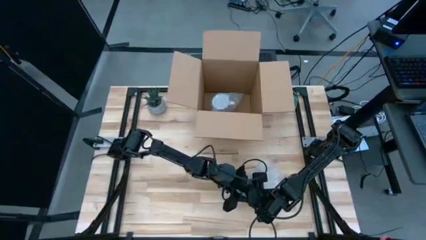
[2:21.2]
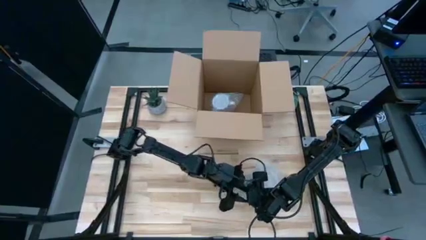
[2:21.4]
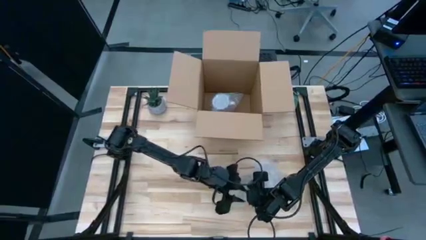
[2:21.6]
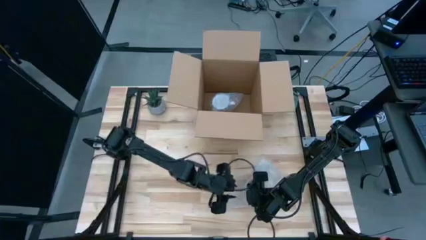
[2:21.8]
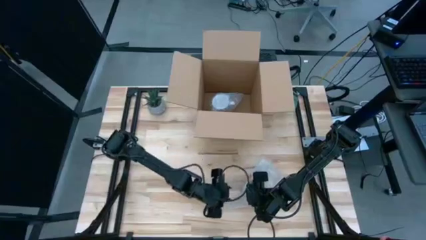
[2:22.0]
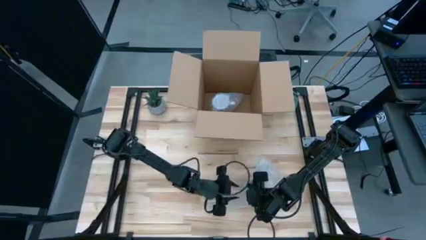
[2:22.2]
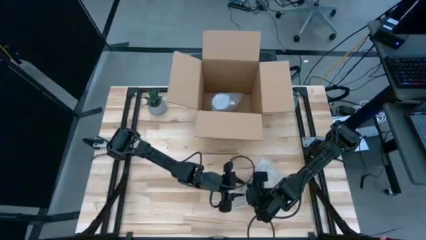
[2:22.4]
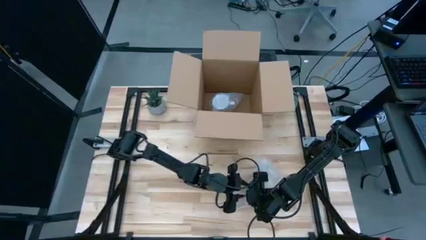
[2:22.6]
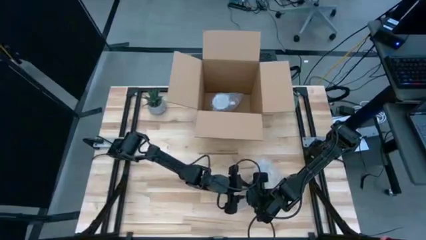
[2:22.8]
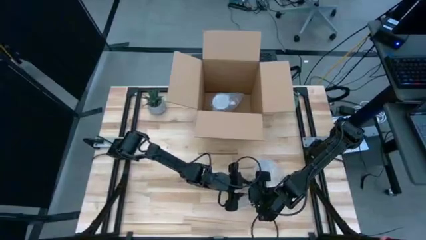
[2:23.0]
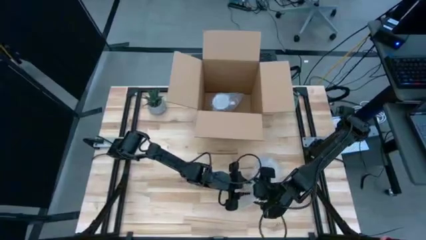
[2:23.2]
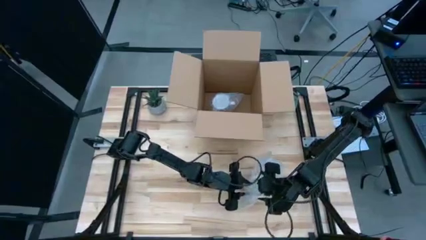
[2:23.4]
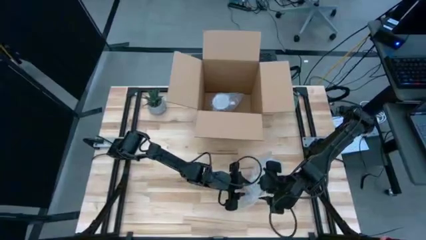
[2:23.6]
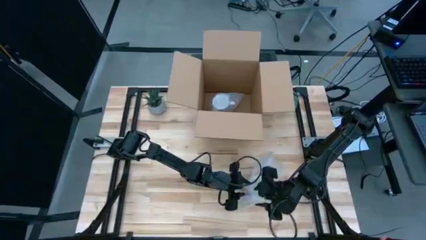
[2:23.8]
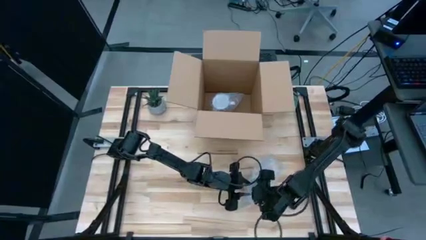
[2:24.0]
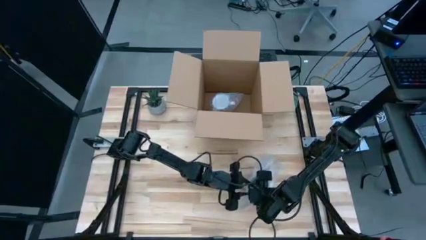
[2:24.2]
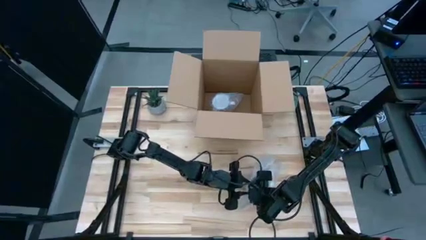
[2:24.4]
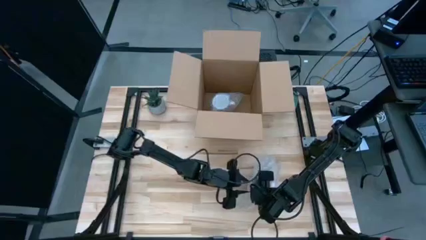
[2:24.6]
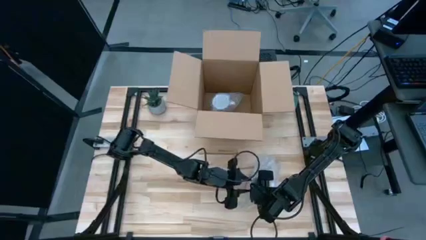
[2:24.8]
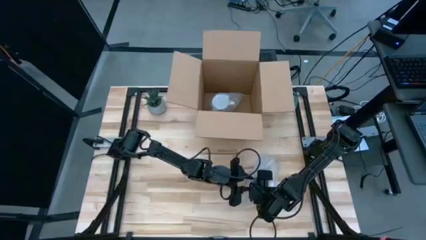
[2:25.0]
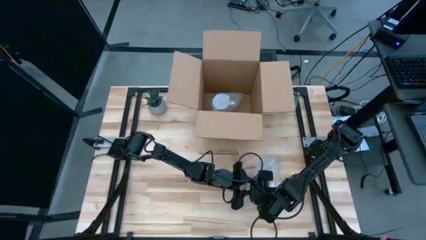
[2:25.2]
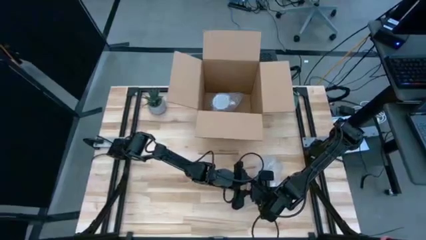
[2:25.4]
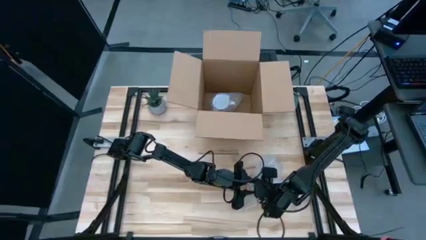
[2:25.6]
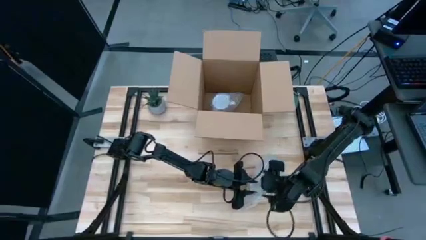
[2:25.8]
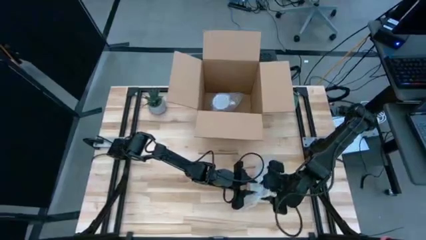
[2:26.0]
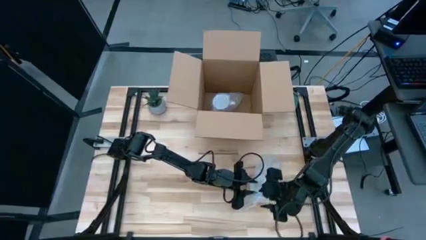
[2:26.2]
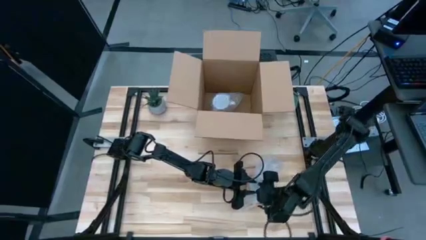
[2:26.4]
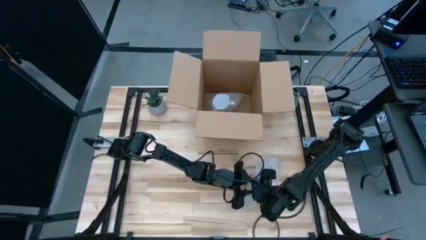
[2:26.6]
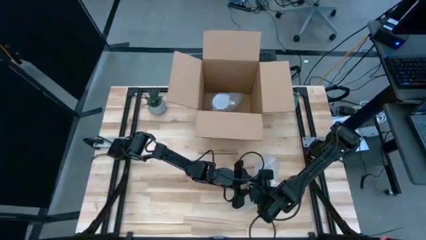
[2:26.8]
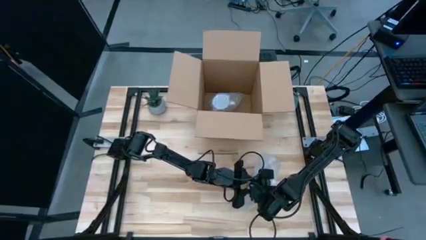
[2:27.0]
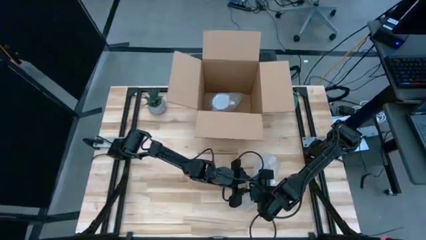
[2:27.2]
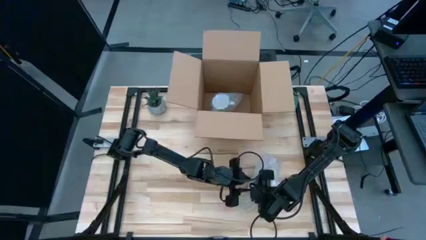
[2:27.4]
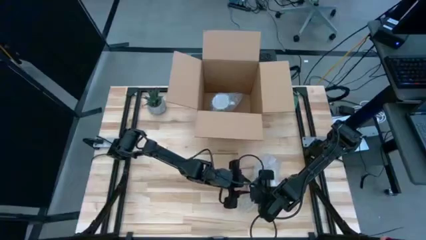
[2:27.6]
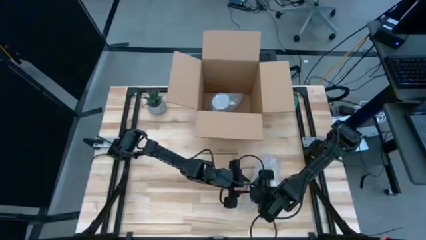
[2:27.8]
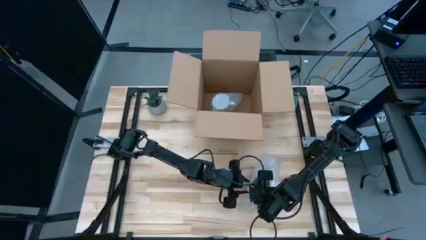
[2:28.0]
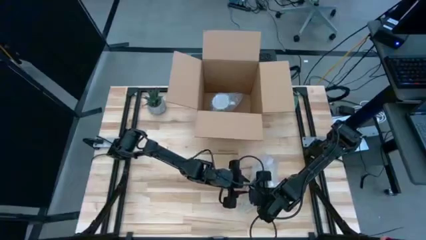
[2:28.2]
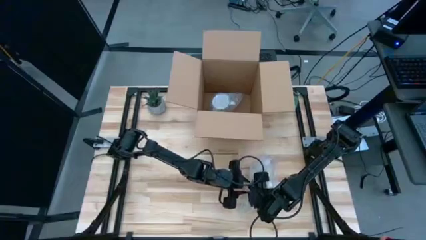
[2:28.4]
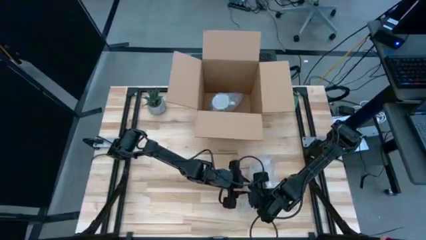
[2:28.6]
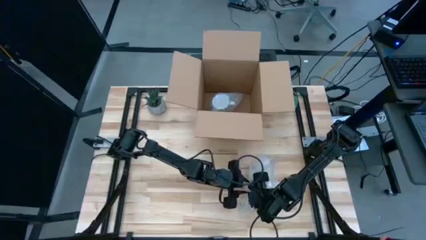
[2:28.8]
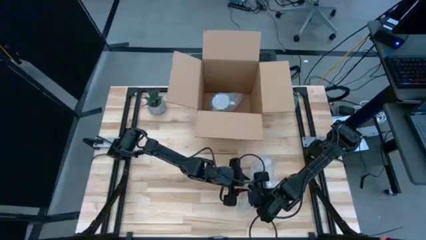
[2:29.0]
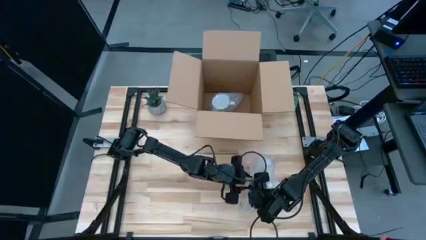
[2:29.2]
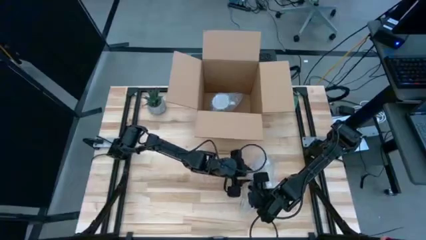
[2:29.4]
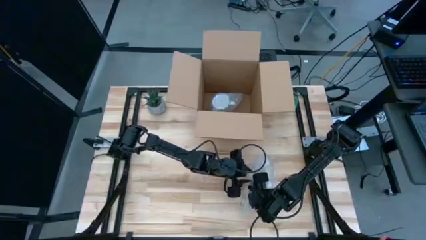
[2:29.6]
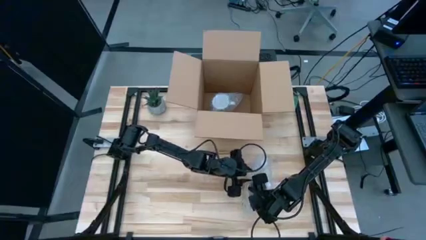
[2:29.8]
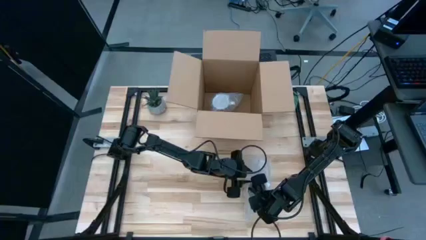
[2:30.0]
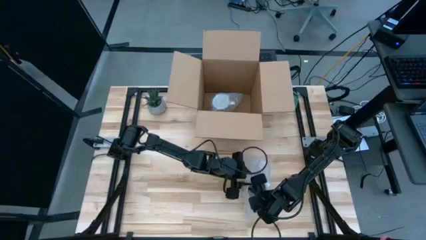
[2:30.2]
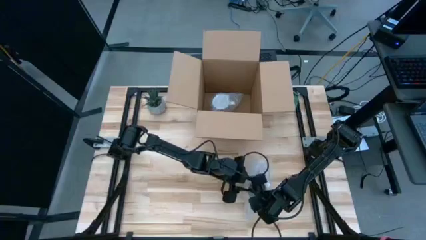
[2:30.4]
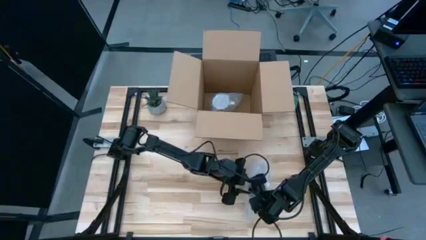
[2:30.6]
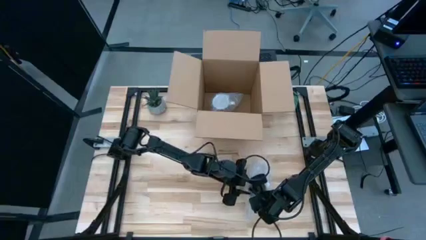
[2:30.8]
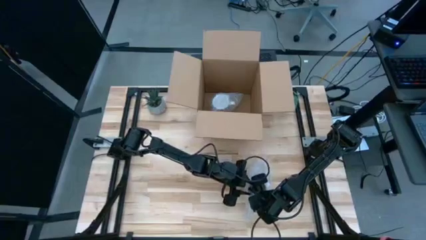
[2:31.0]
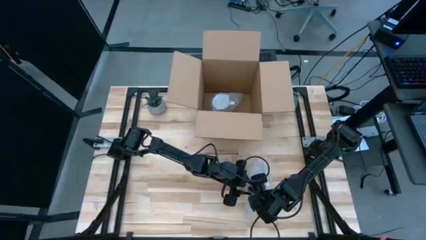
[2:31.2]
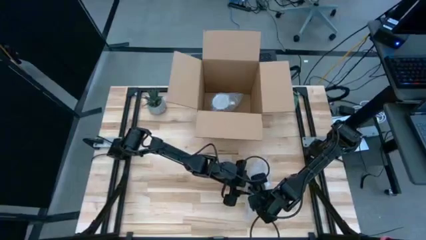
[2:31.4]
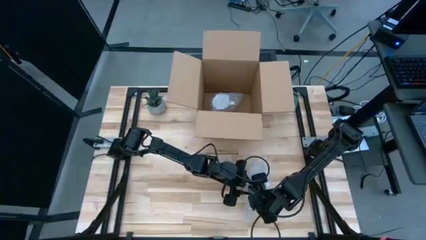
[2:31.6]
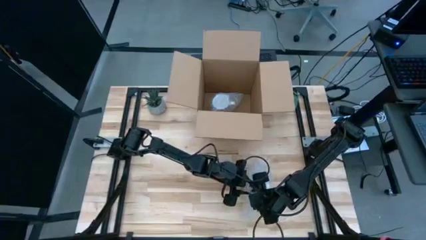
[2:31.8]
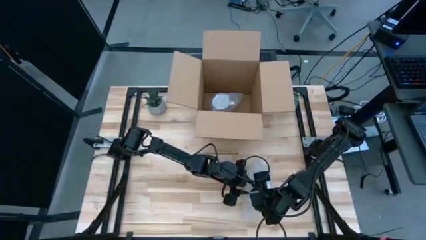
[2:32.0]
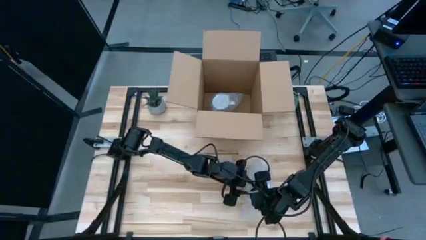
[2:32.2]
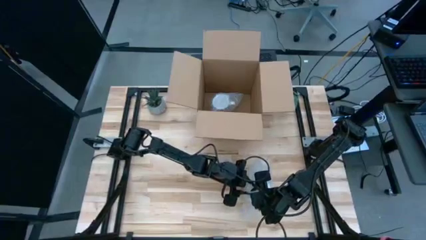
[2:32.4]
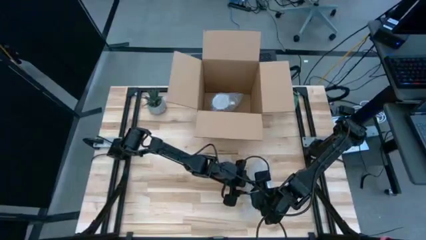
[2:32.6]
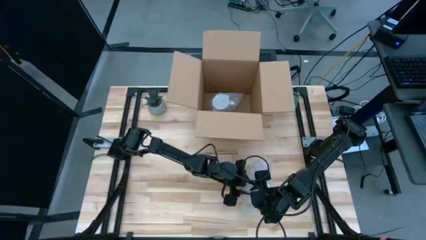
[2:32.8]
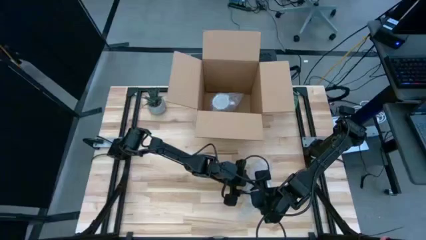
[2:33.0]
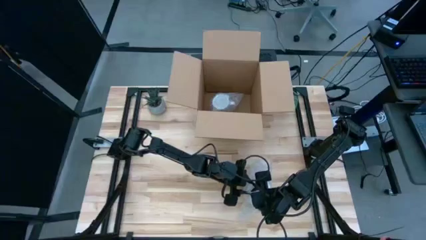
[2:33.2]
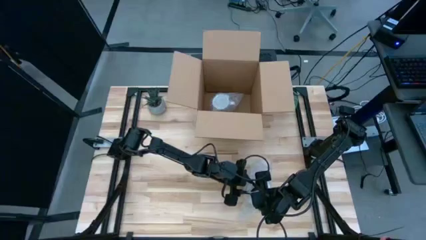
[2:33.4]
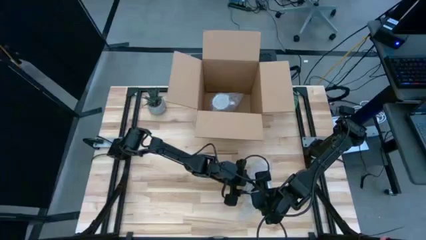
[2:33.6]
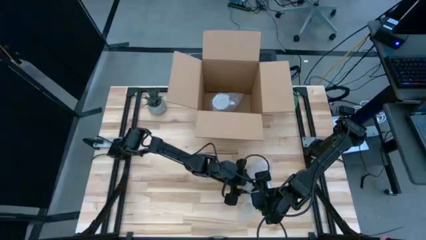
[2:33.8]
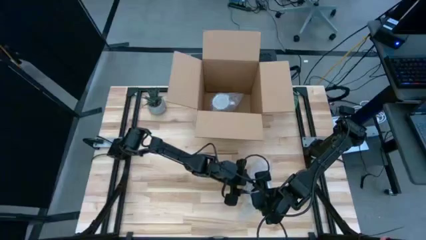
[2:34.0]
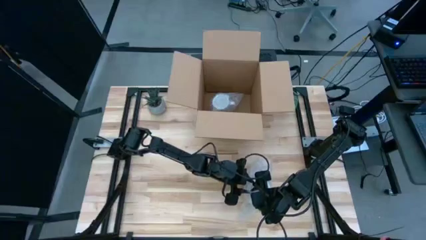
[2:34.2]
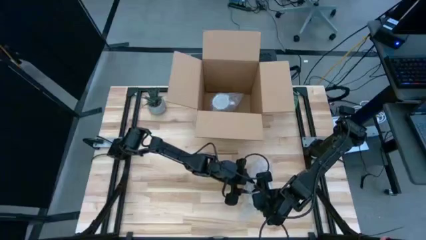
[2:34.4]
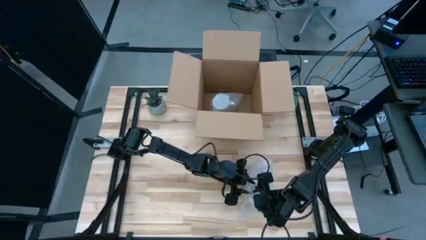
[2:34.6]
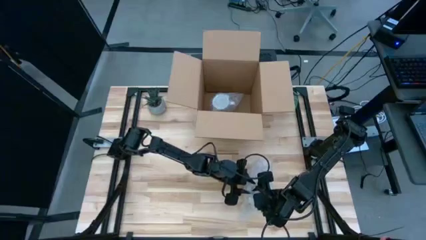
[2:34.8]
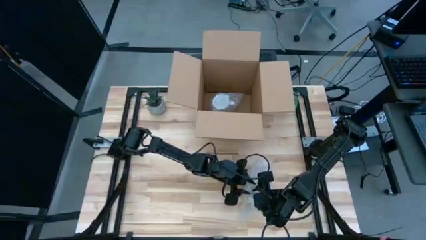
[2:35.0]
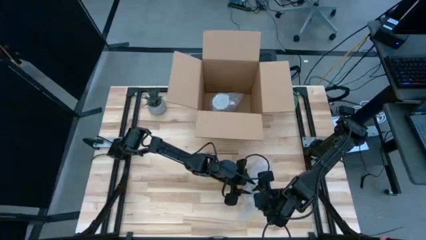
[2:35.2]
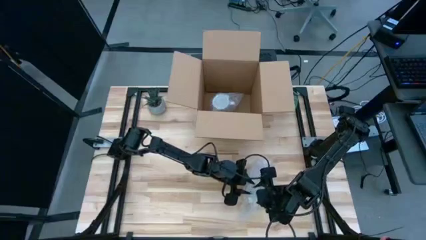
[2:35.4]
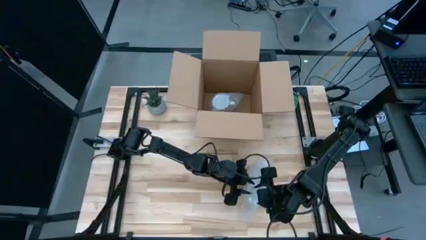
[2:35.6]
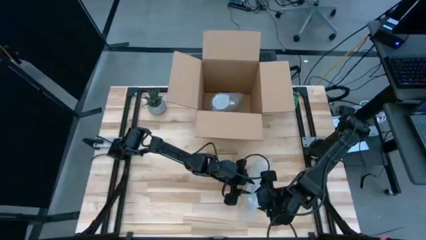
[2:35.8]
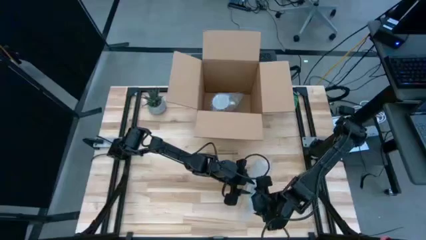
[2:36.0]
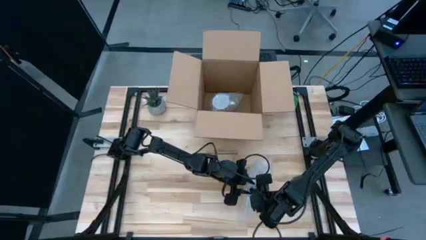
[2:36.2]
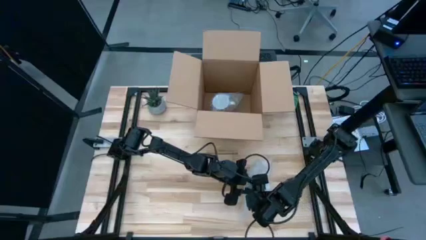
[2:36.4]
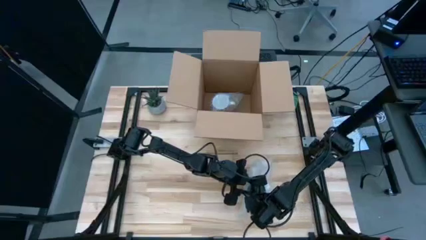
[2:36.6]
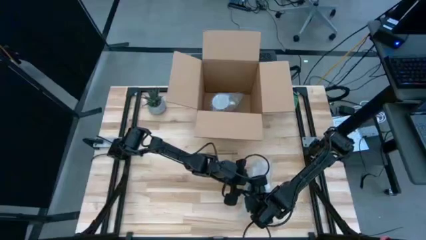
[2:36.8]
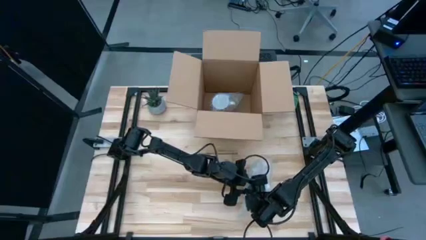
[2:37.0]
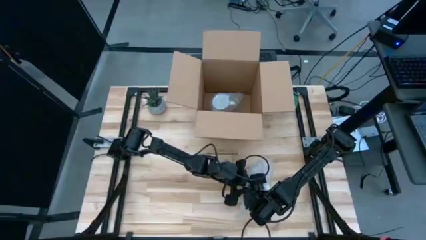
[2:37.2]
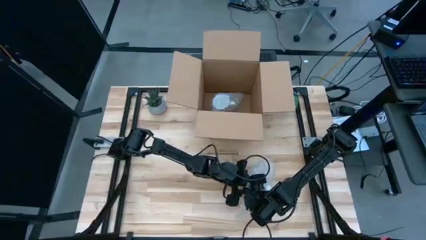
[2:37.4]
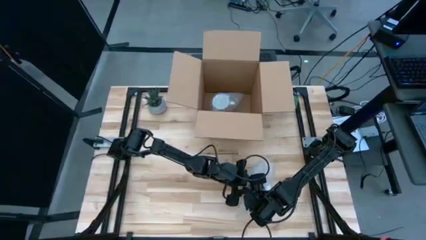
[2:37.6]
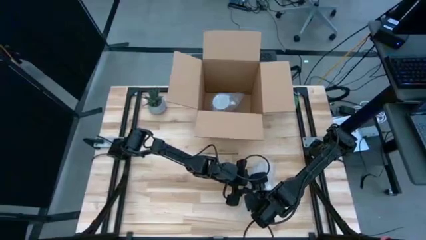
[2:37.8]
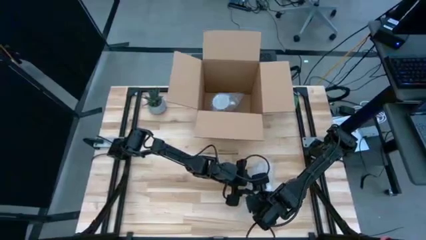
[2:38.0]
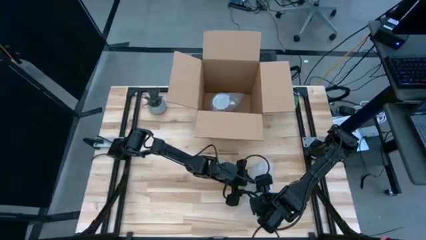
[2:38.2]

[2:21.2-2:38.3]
Task: wrap mug
Wrap the orange mug with the bubble wrap
